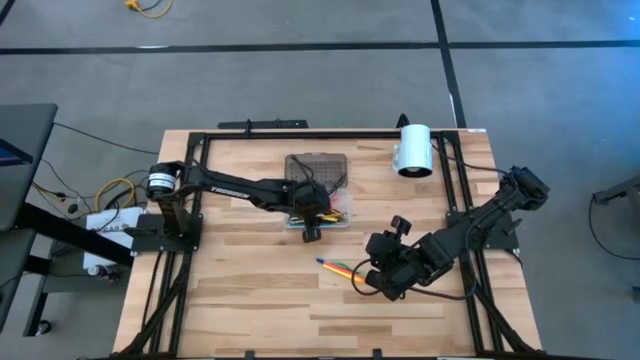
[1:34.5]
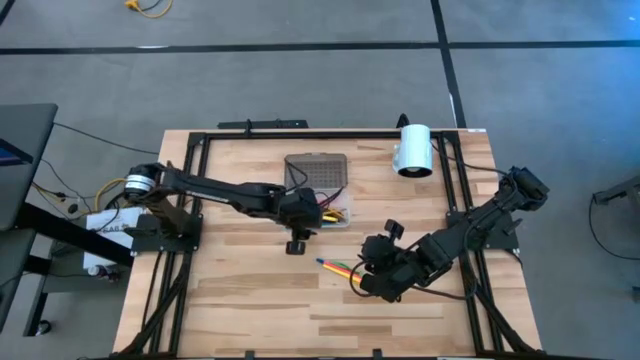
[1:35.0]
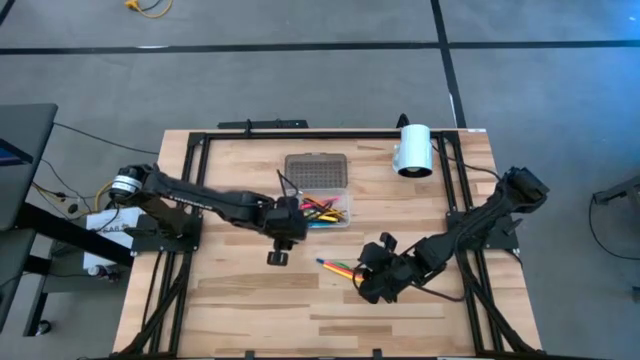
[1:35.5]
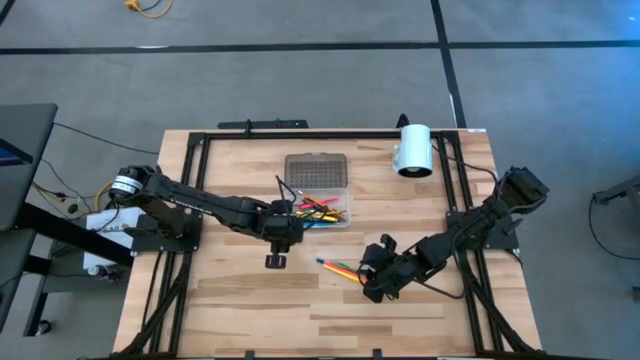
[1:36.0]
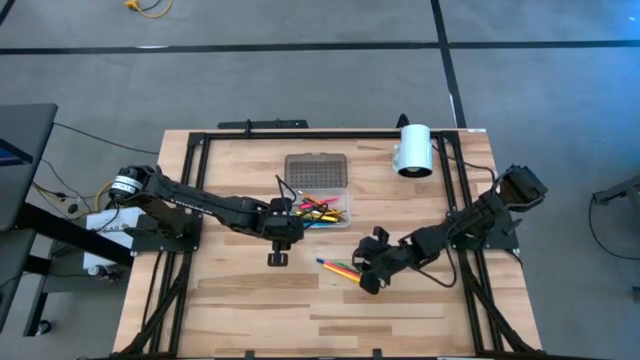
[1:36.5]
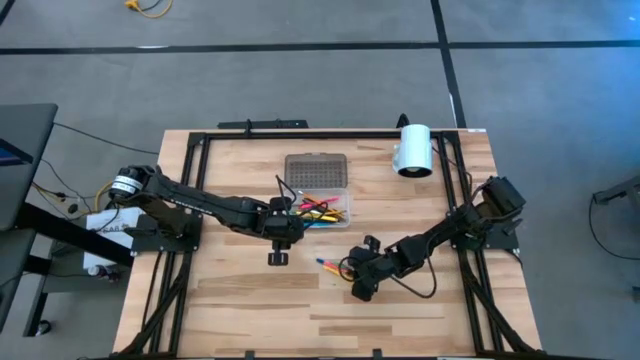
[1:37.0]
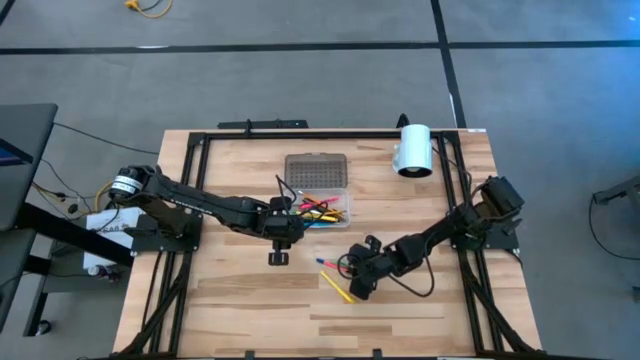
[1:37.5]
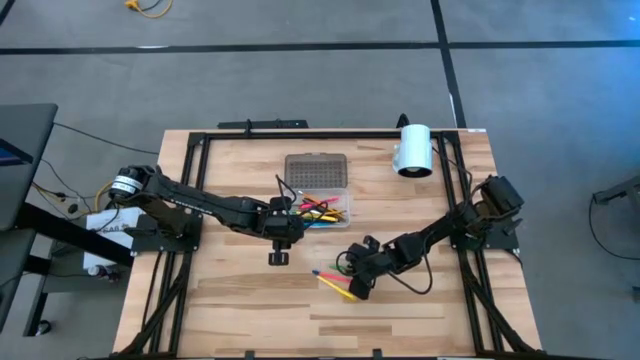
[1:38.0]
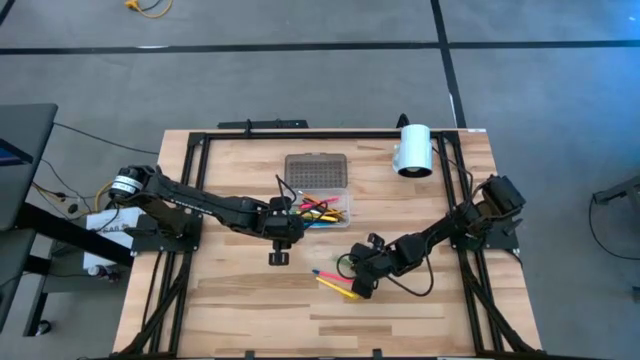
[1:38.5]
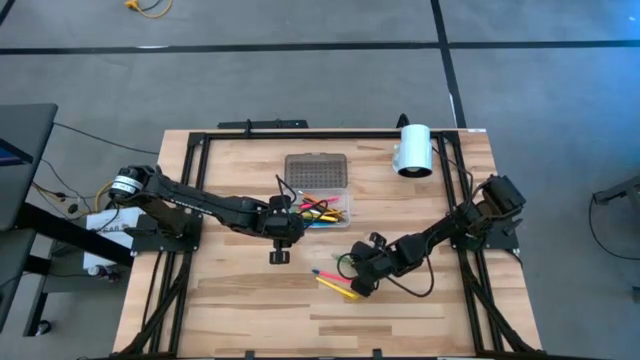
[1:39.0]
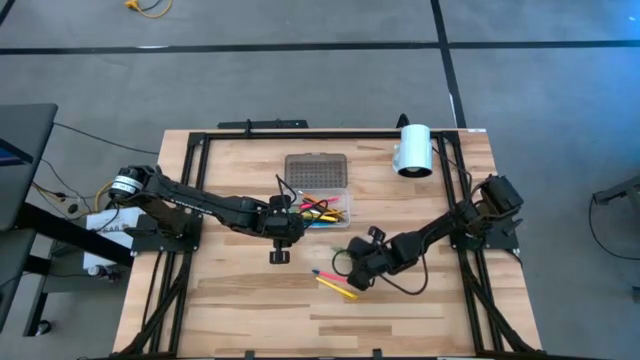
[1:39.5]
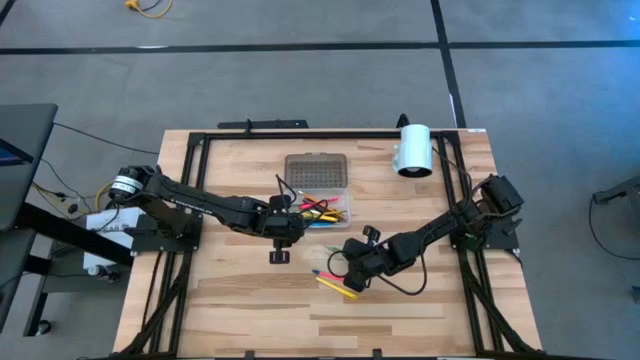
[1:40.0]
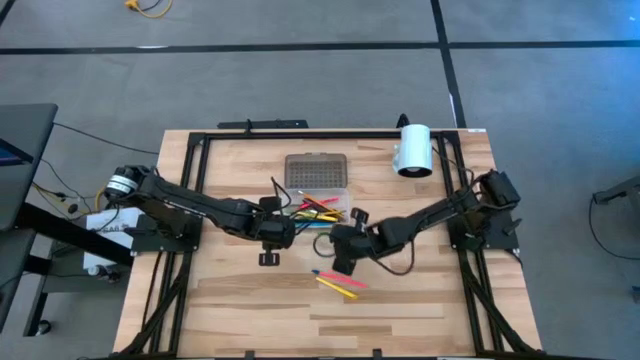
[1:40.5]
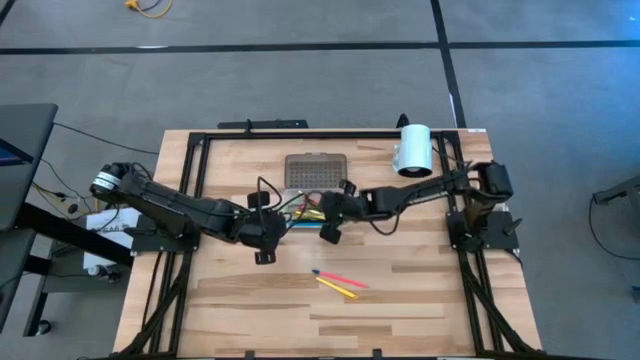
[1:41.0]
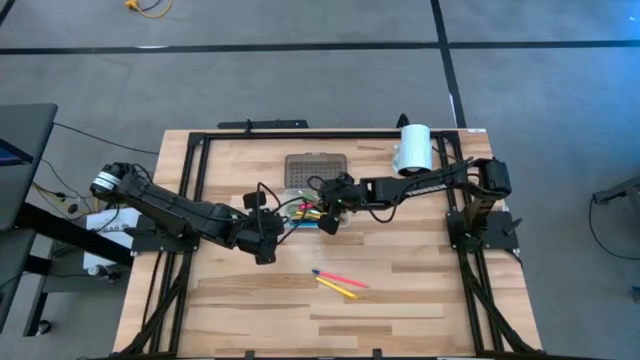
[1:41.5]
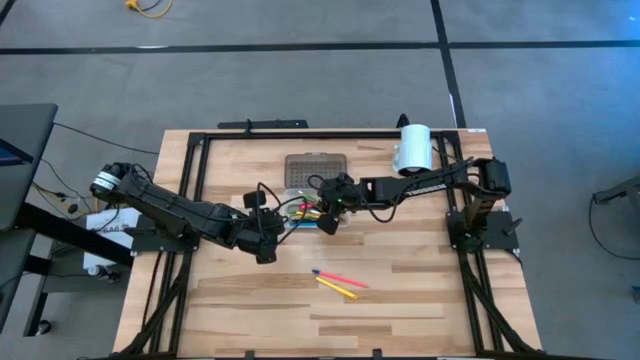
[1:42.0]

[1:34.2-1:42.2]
Task: Pick & place school supplies into a supply box
Put the green pen into the supply box

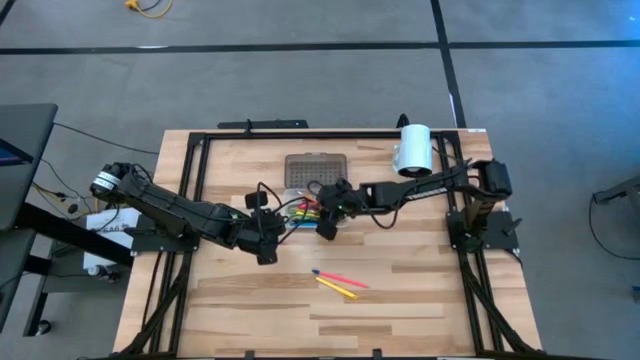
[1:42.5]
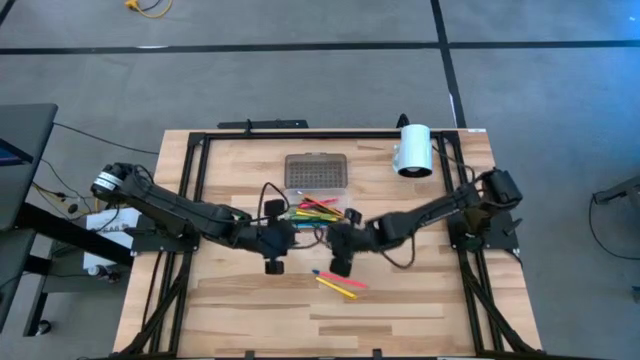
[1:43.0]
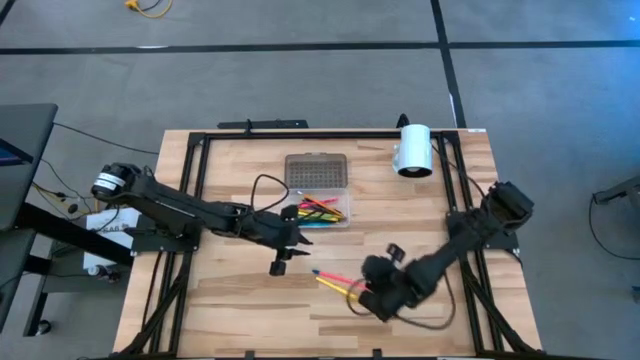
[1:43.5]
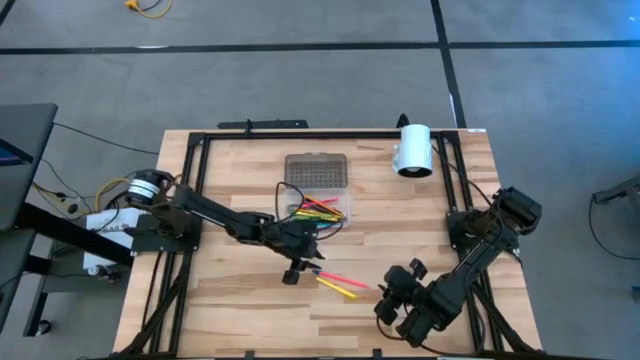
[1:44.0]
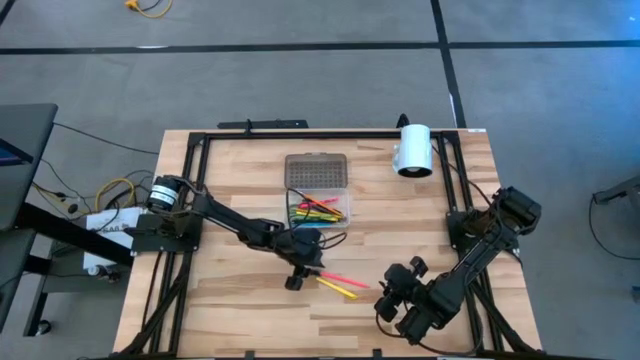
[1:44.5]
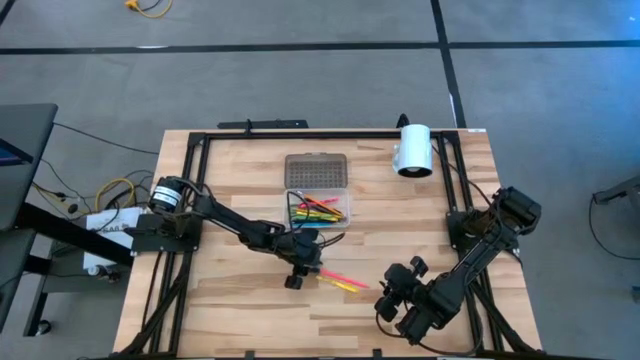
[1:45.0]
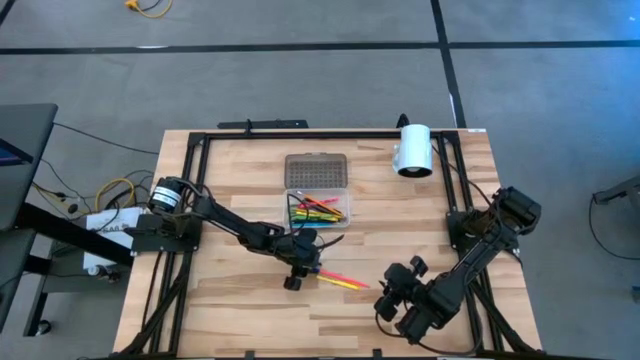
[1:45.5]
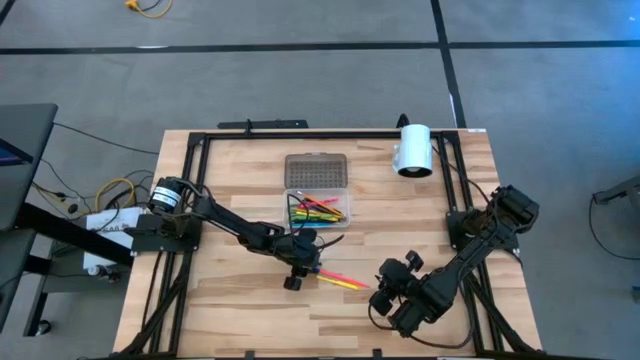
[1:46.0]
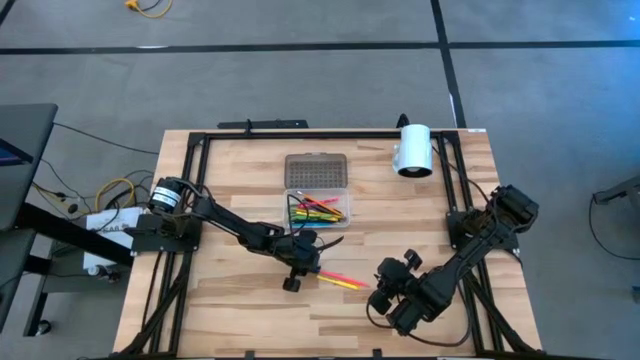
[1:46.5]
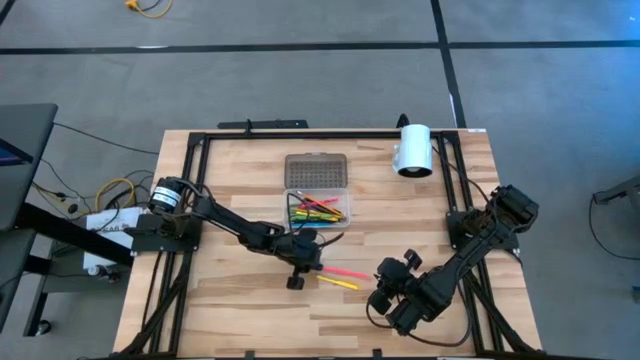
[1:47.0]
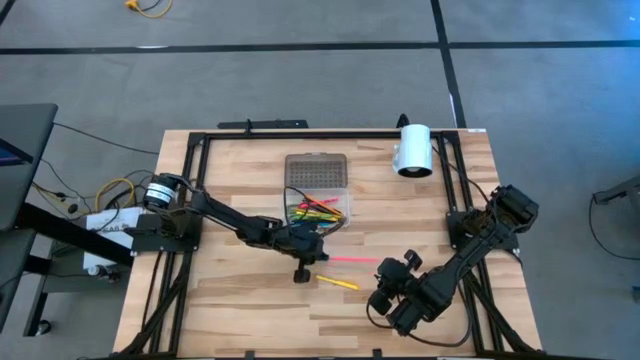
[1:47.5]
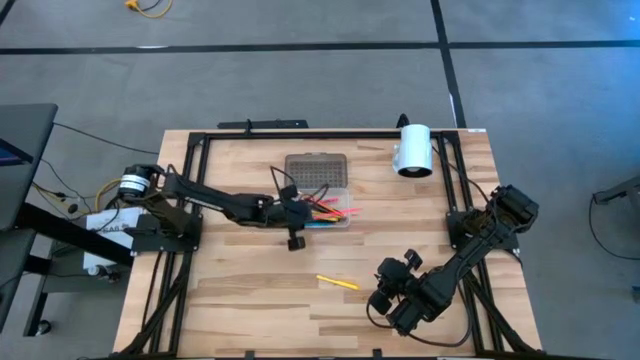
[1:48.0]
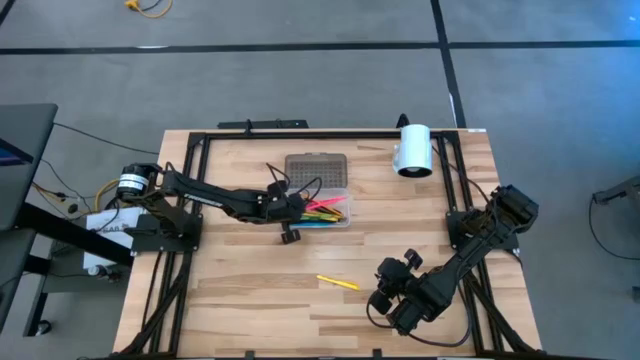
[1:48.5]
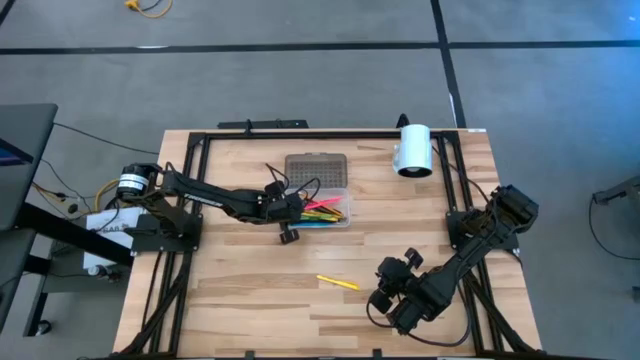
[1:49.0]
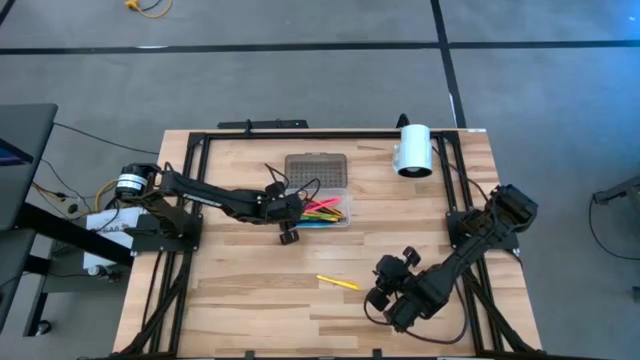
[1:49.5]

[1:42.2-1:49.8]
Put the pink pencil into the supply box

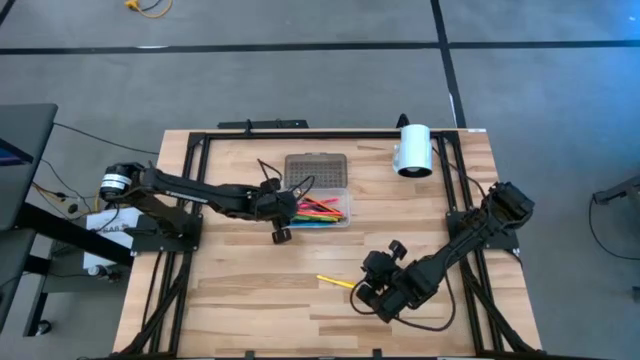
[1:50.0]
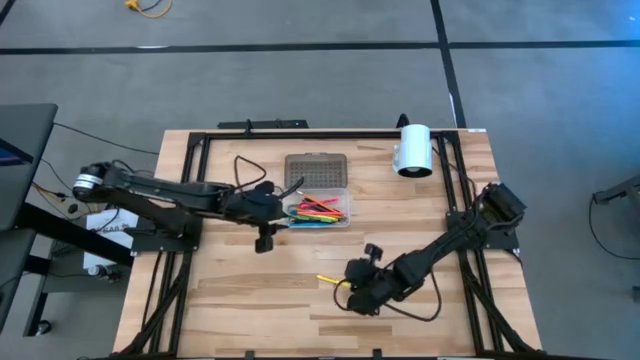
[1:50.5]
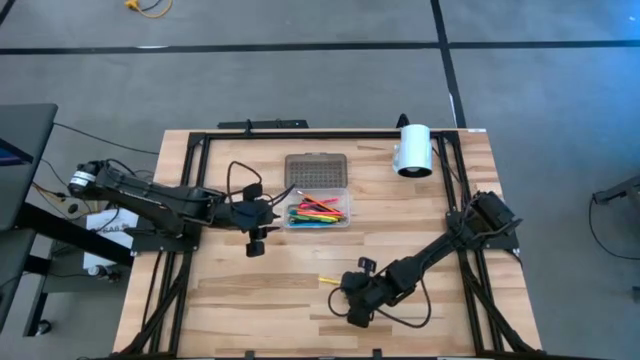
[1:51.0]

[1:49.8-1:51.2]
Put the yellow pen into the supply box

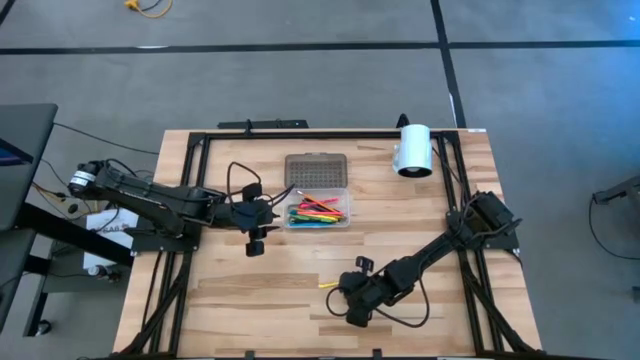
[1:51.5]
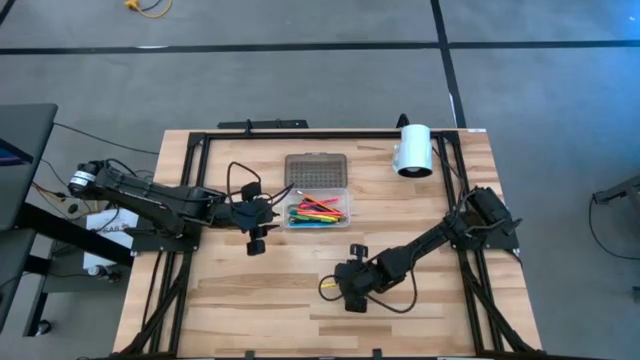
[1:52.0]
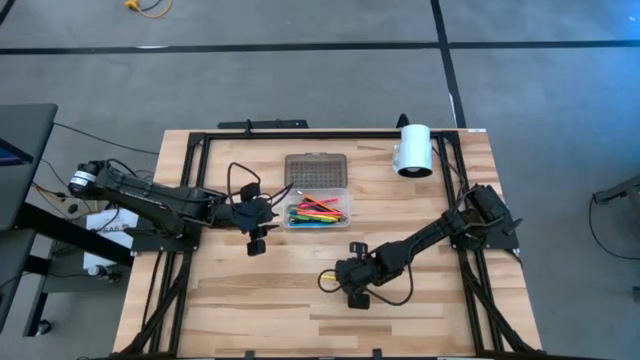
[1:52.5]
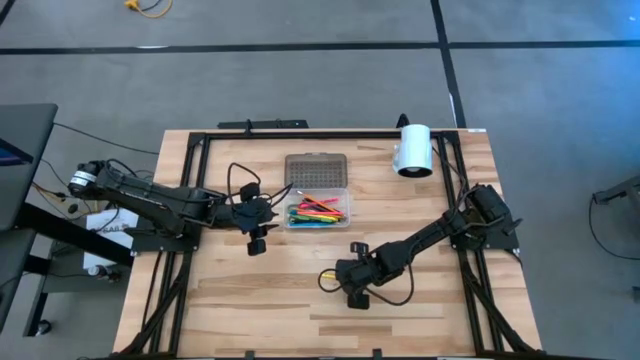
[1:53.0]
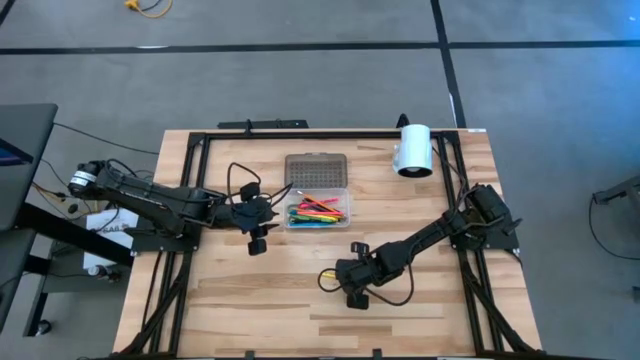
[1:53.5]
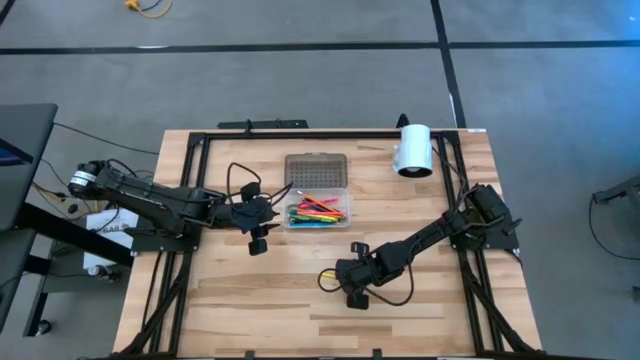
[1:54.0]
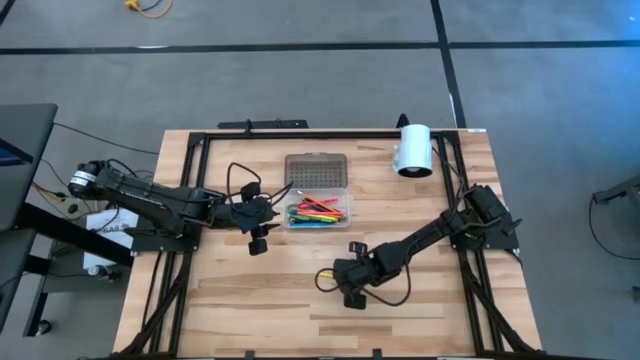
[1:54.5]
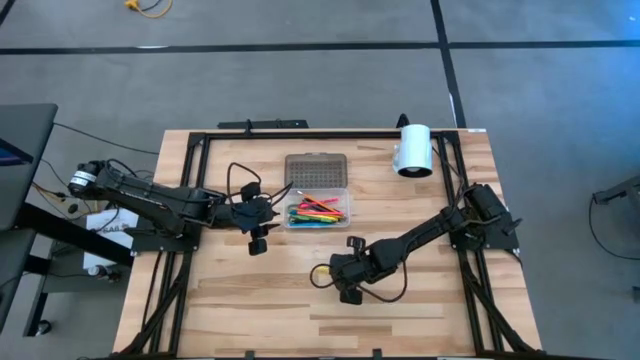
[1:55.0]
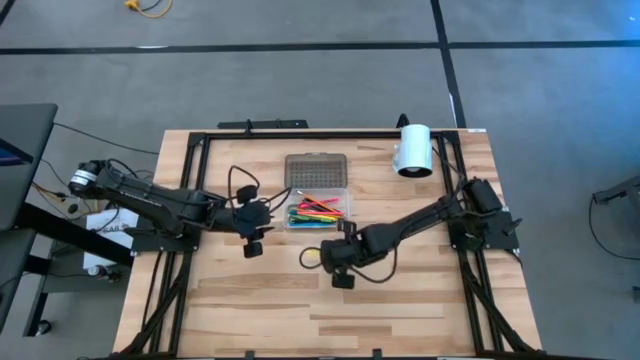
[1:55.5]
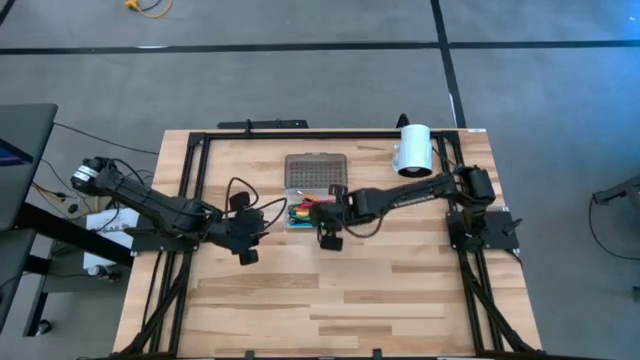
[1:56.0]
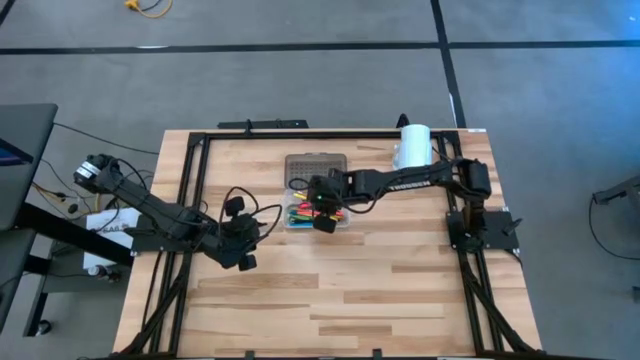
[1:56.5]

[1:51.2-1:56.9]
Put the yellow pen into the supply box
